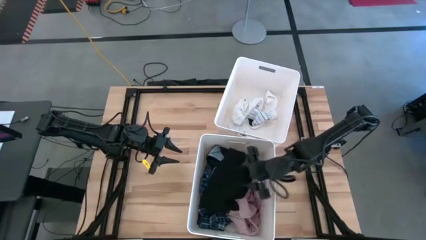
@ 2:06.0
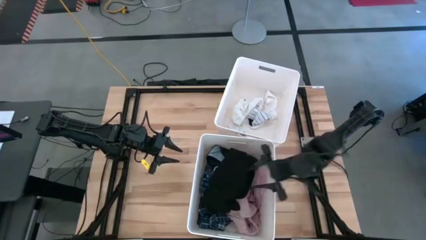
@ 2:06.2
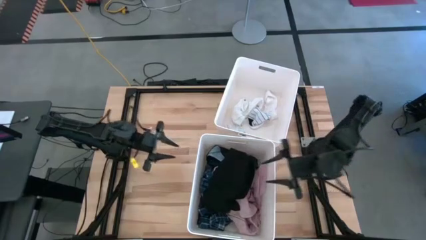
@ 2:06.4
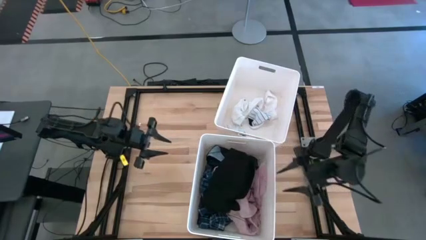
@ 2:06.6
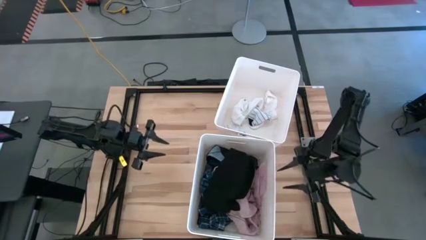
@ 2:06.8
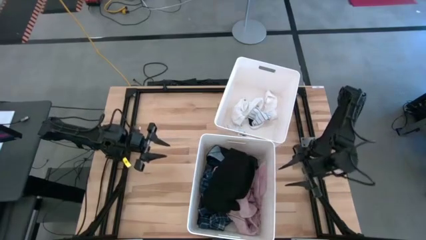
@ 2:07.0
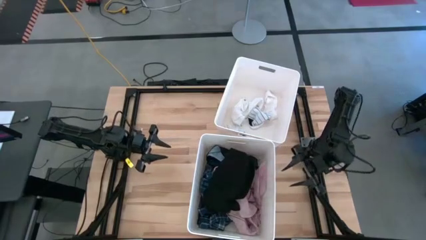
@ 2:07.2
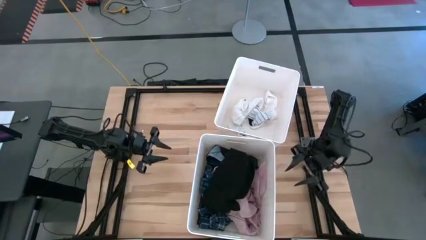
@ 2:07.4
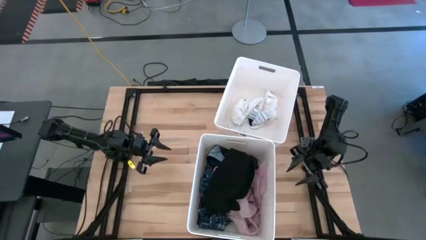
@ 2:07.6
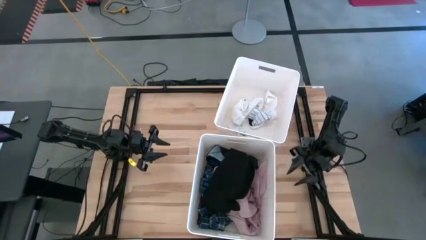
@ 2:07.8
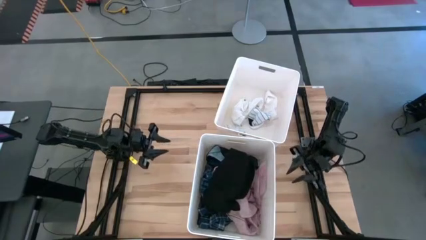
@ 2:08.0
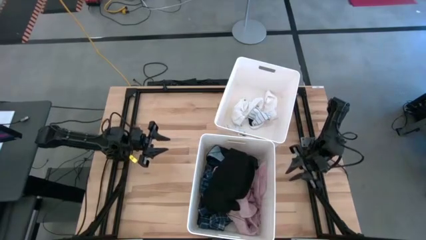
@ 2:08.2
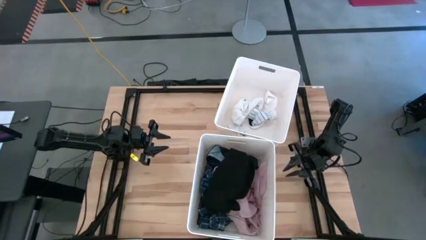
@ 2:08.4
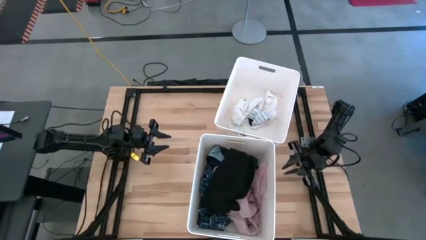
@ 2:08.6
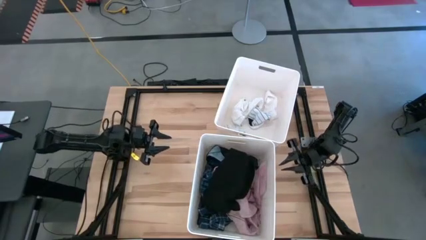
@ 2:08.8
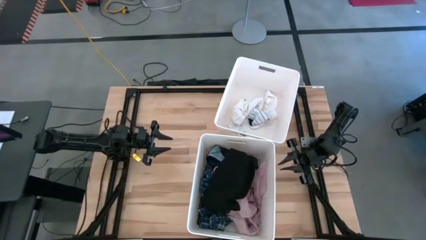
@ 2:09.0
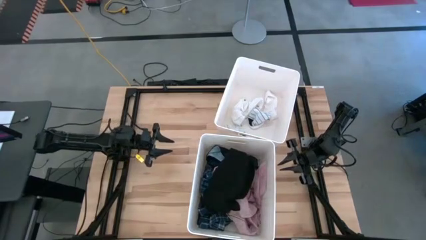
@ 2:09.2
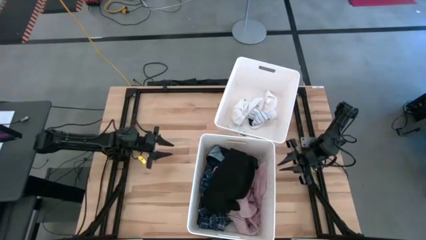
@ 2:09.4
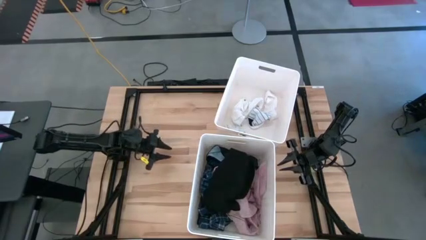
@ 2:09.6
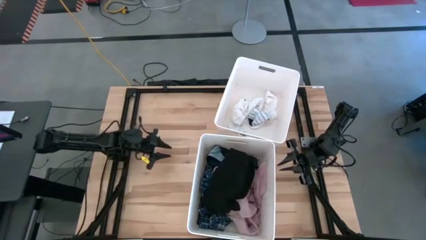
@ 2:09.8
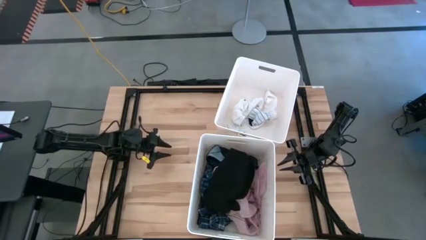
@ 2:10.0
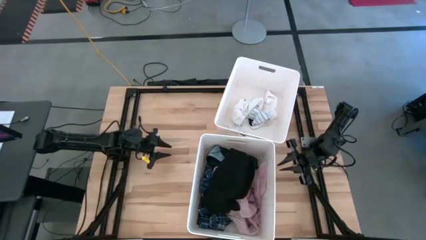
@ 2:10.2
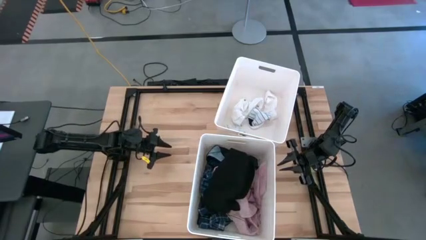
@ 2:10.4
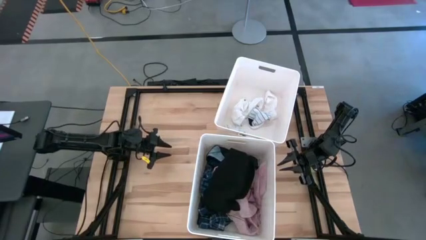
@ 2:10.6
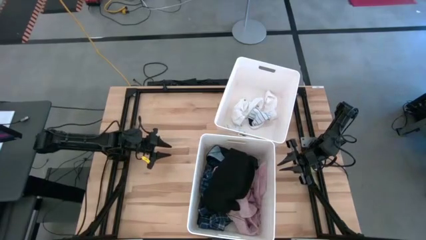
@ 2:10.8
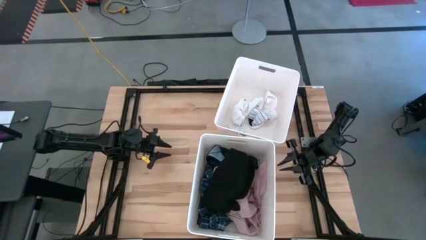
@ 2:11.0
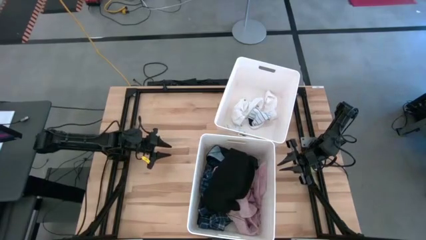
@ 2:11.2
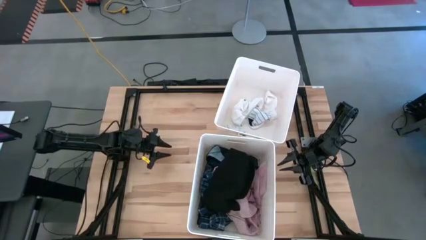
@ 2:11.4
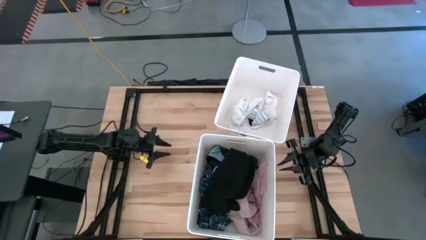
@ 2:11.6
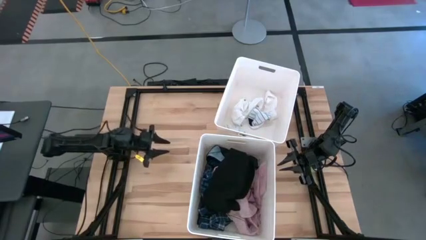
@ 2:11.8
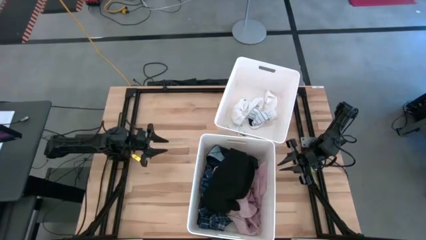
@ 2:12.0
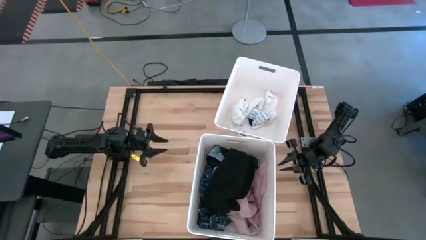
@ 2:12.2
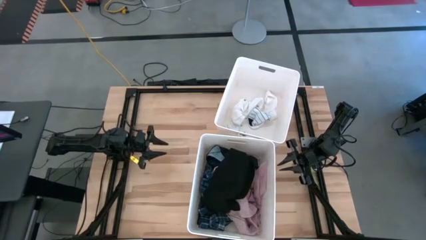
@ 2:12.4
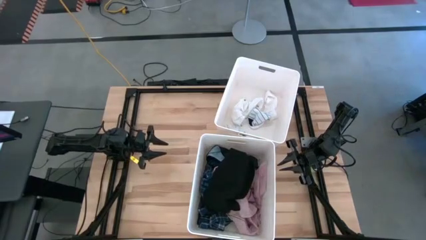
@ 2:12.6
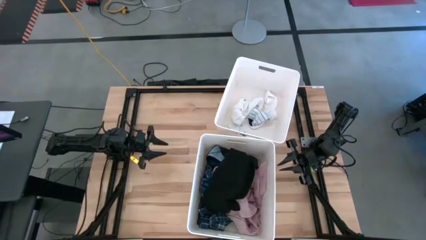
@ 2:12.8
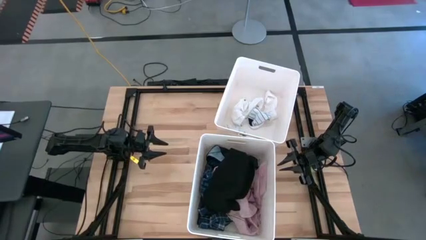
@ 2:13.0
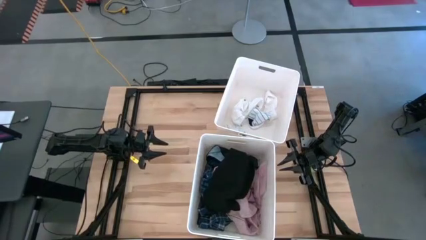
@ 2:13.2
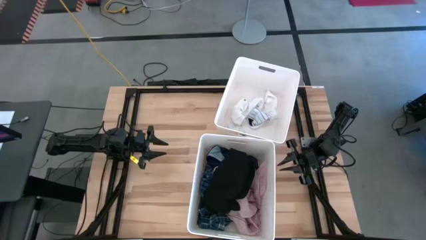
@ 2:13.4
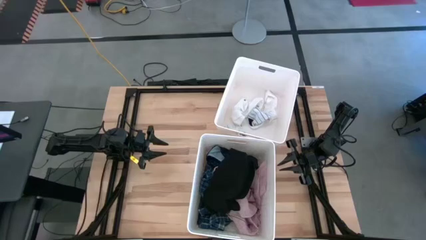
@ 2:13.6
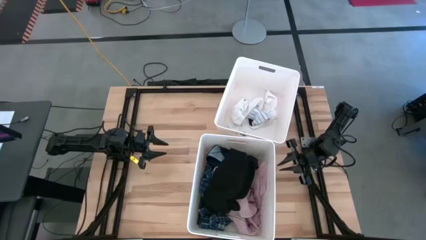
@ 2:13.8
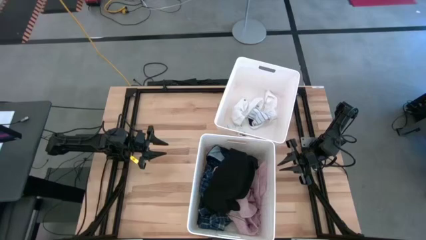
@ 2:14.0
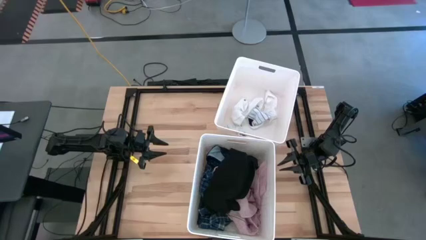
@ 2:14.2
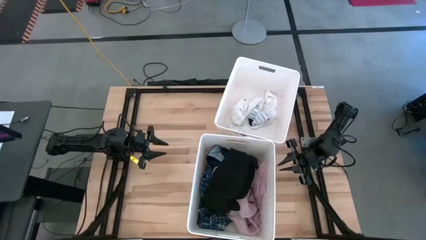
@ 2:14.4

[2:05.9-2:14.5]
Task: Sort clothes
Return to Home Position

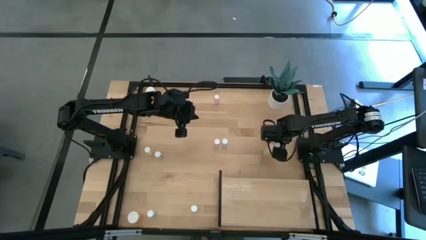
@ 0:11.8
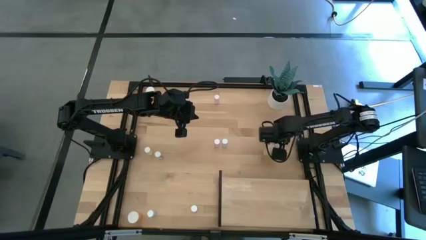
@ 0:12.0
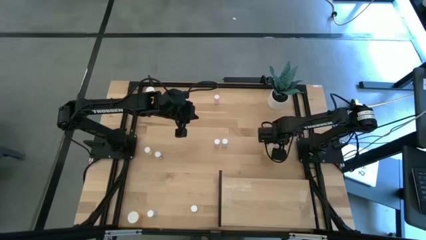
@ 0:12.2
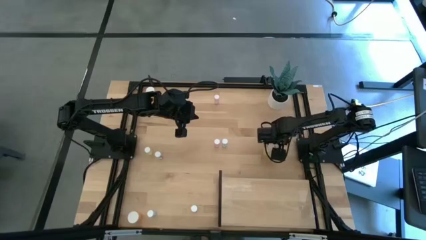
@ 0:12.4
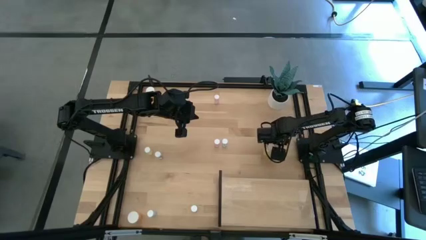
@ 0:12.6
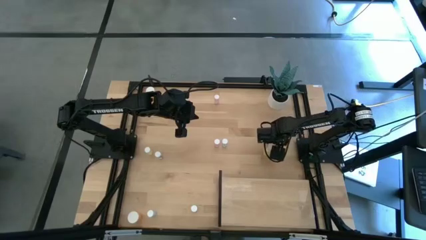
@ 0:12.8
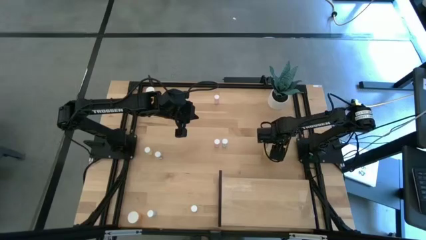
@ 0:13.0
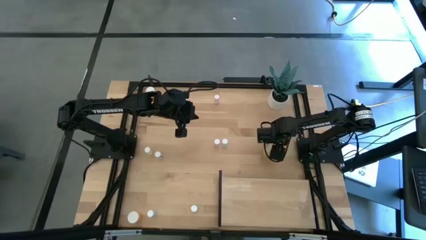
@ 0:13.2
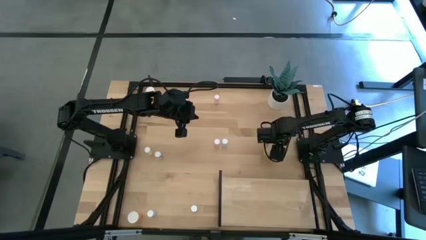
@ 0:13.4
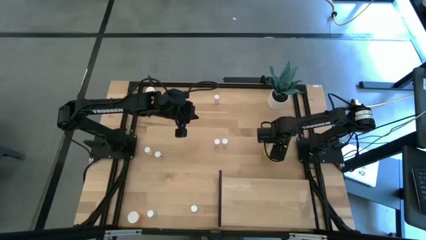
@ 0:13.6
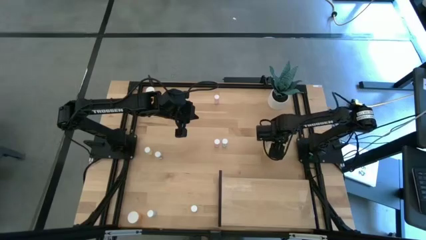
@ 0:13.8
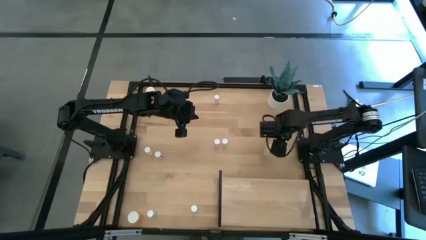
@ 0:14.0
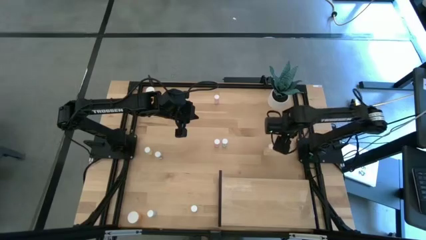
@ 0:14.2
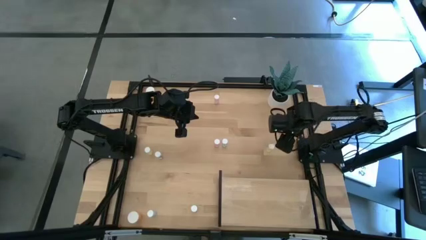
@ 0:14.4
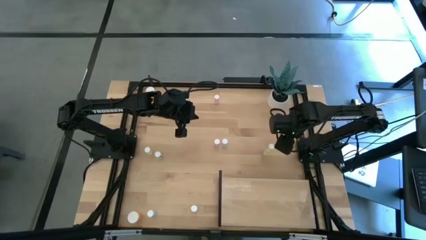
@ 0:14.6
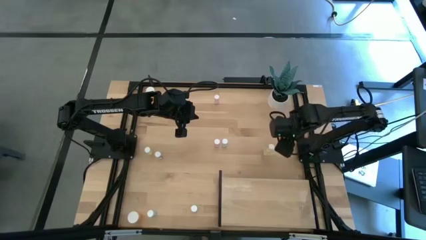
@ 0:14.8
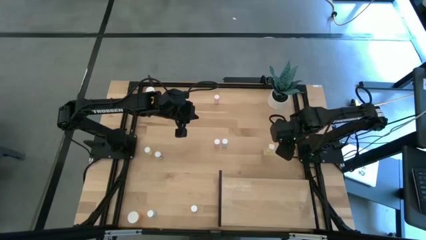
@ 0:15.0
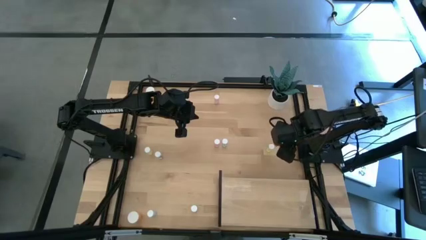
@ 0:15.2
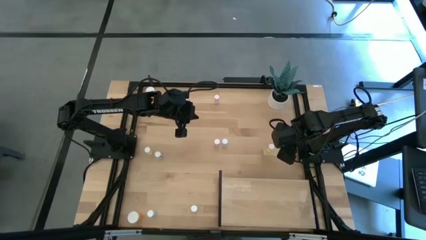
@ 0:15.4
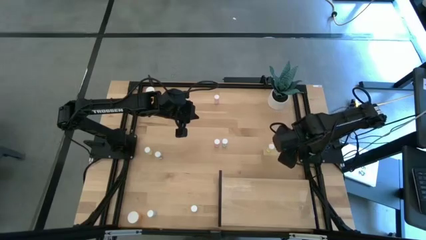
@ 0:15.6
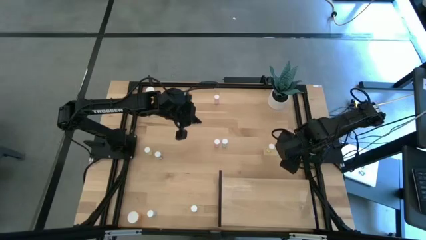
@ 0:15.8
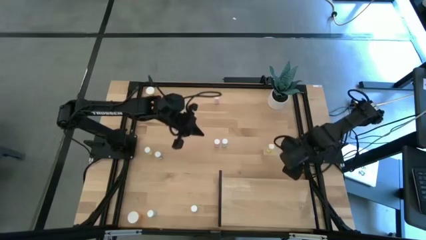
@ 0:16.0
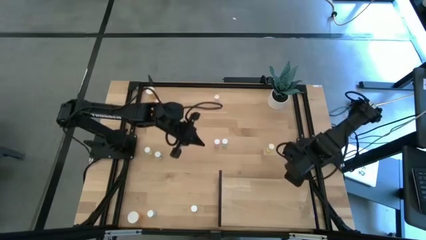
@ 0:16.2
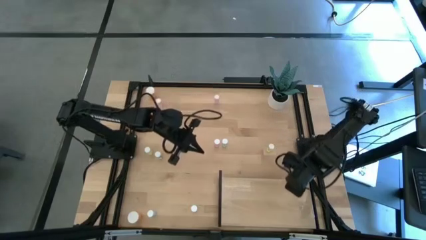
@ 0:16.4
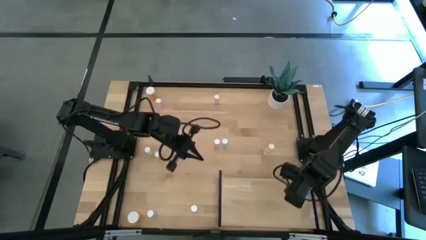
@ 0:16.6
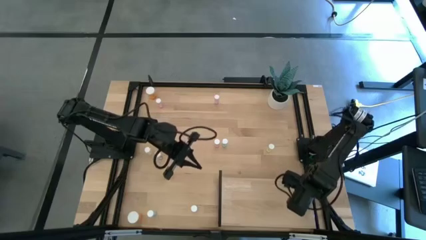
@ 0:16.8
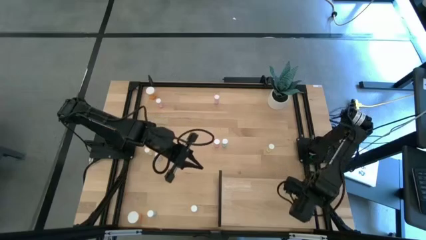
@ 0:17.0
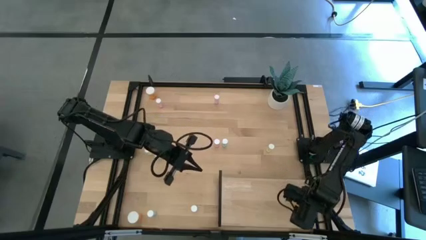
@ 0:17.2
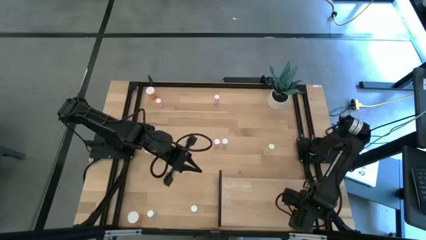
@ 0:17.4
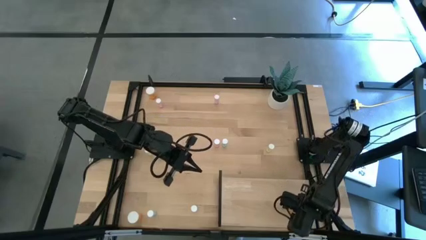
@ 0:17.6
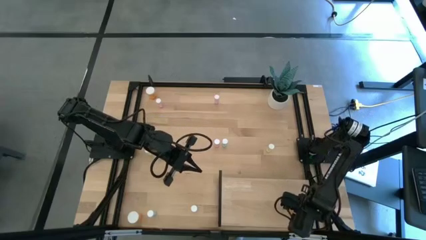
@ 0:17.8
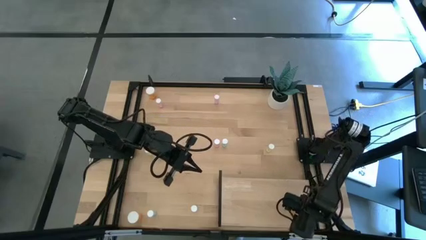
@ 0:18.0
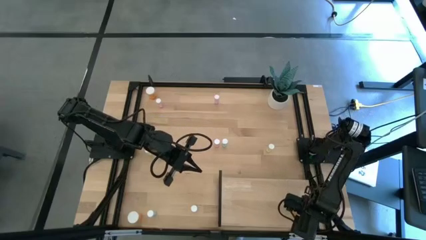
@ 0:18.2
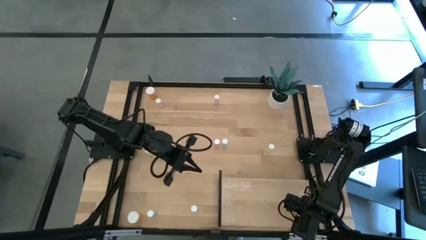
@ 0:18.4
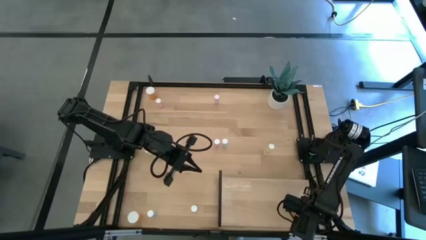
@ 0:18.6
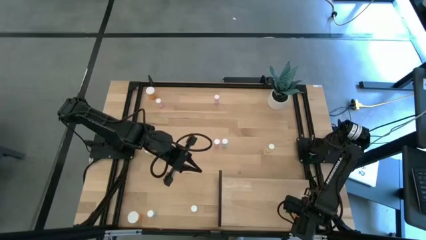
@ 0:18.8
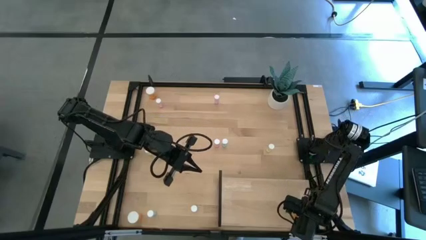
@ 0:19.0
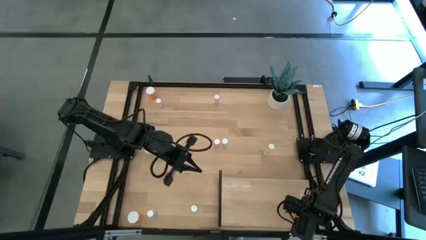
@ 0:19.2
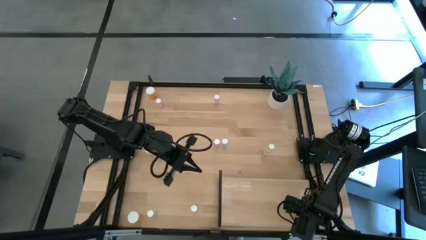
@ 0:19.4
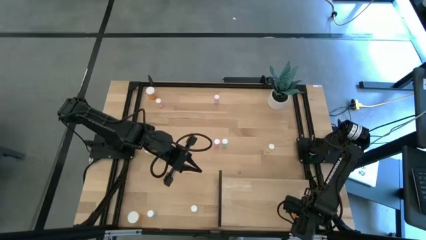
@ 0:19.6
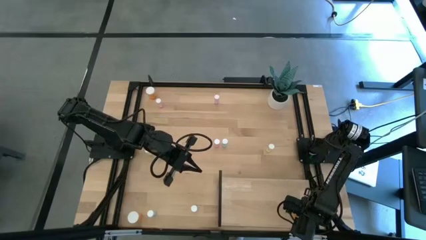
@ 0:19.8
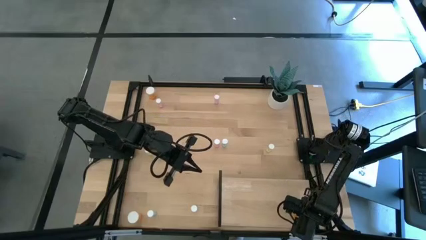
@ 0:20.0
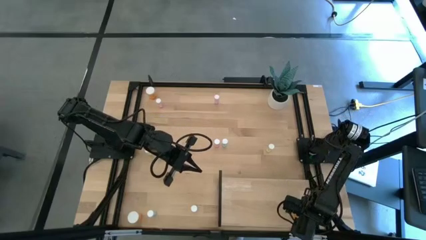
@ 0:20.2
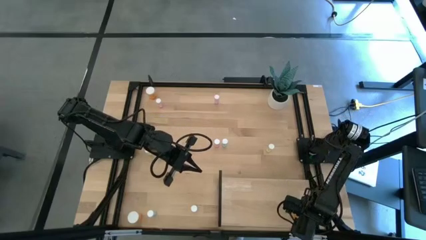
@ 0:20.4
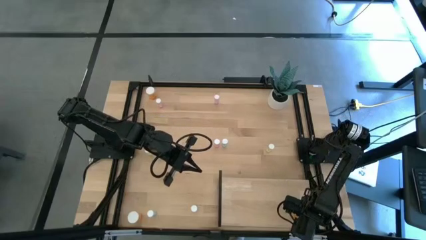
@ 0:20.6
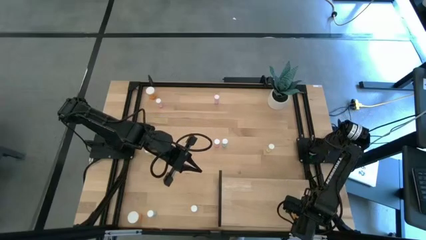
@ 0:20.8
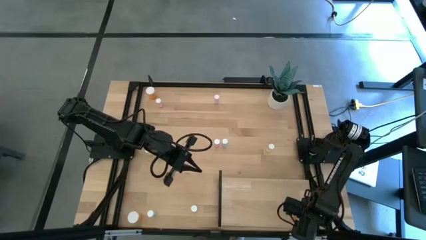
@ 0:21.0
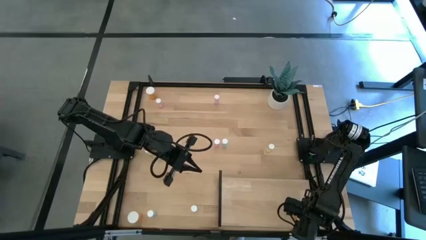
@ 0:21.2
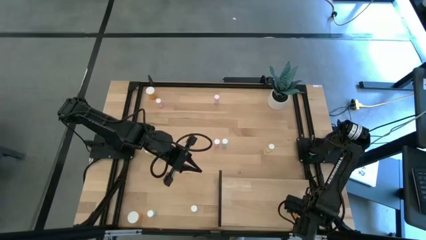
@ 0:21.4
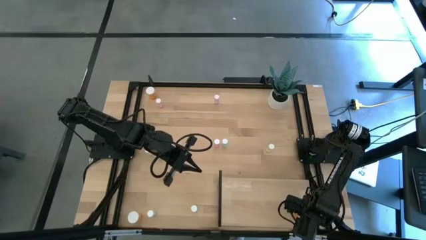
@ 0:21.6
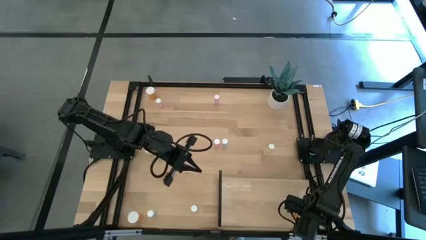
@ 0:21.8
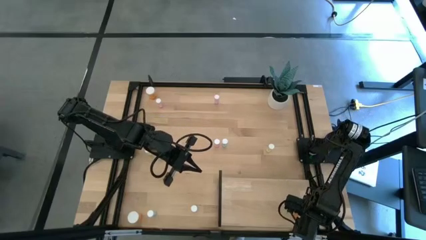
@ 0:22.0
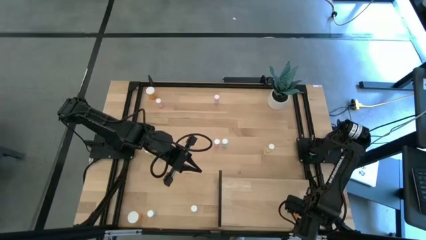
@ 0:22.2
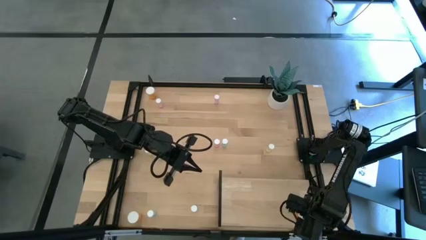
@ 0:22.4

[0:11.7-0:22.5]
Task: Pick and place medicine bottles onto shelf by color
Put the middle right orange pill bottle on the shelf
